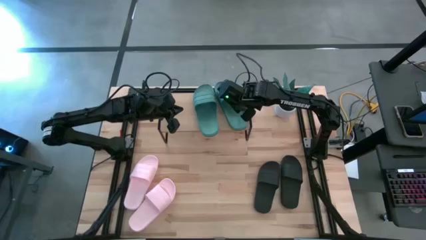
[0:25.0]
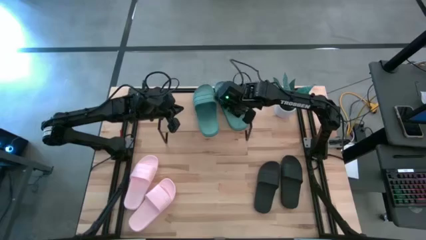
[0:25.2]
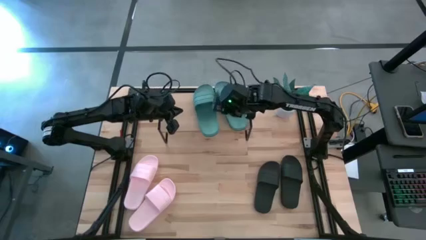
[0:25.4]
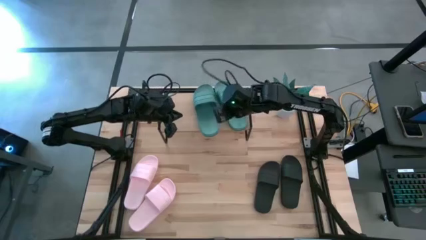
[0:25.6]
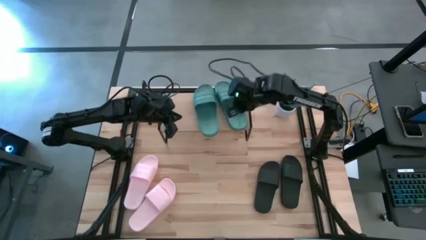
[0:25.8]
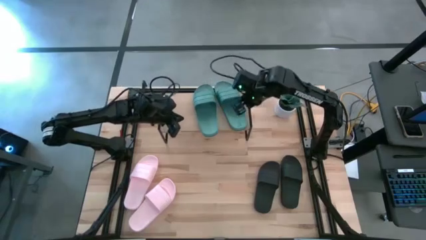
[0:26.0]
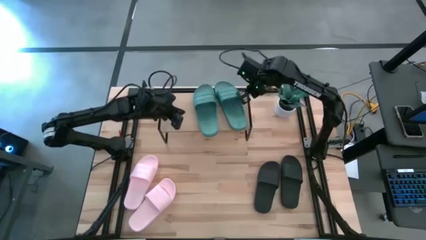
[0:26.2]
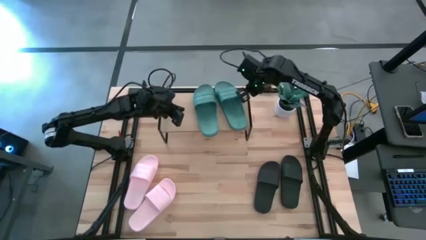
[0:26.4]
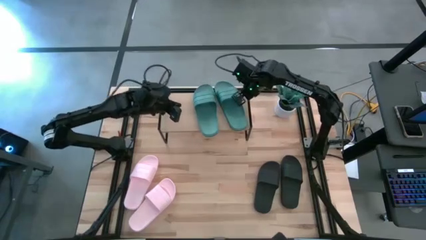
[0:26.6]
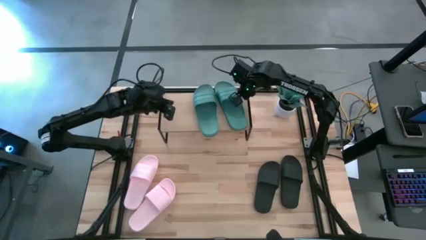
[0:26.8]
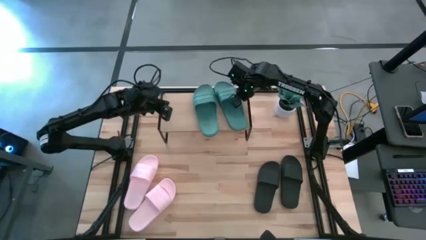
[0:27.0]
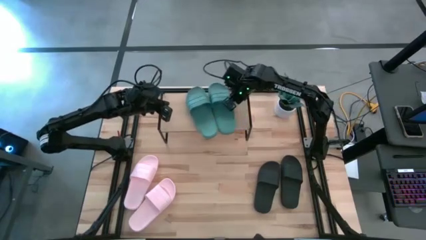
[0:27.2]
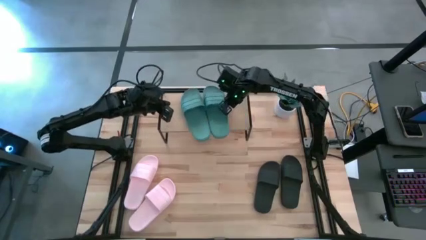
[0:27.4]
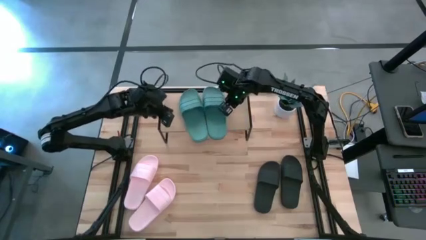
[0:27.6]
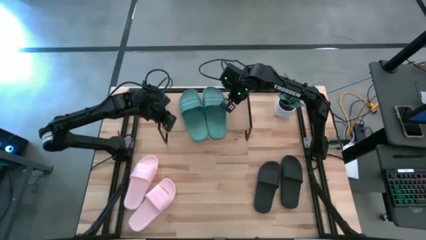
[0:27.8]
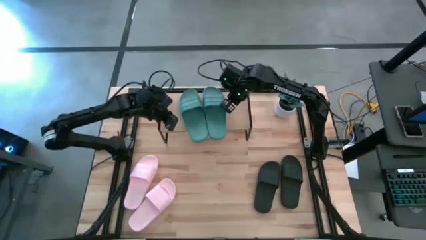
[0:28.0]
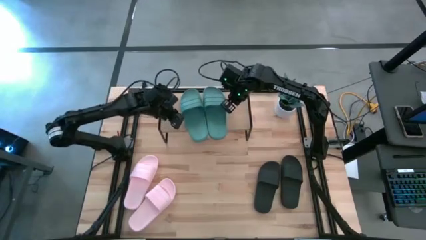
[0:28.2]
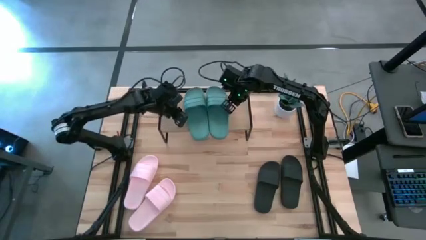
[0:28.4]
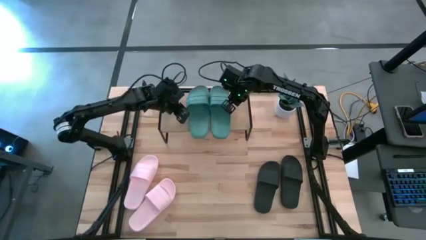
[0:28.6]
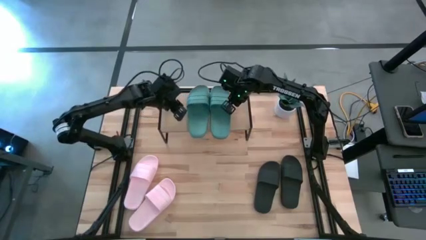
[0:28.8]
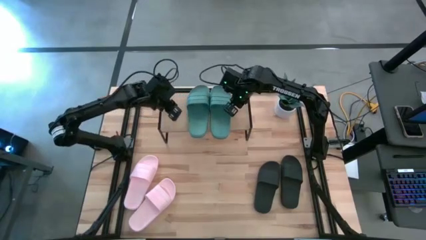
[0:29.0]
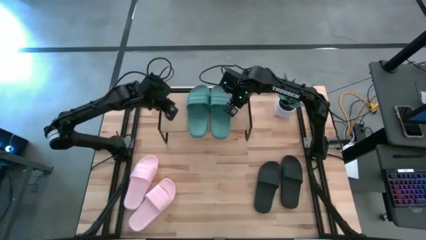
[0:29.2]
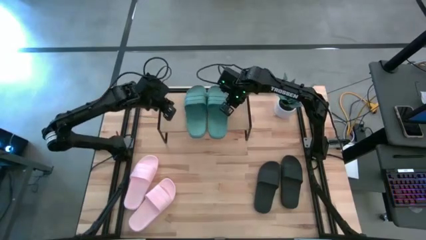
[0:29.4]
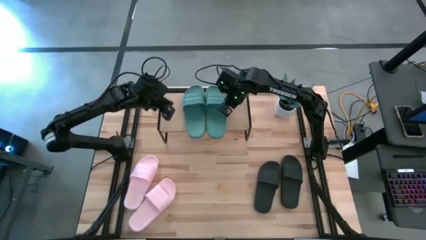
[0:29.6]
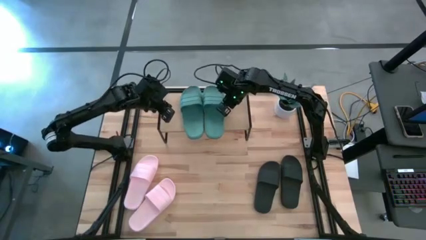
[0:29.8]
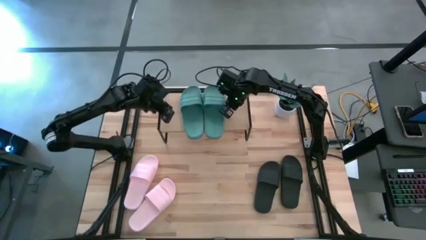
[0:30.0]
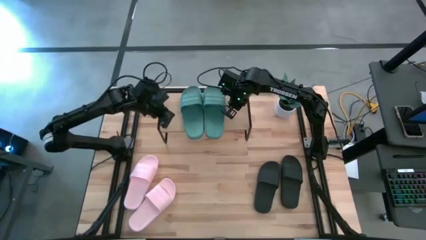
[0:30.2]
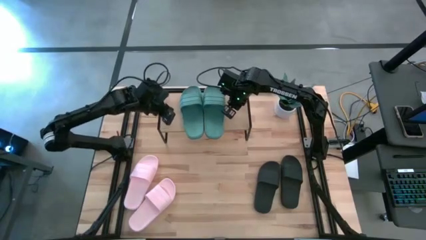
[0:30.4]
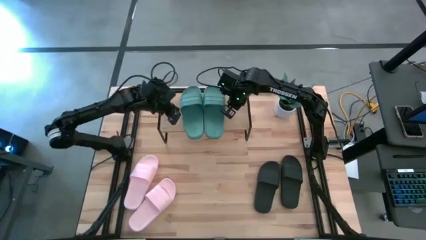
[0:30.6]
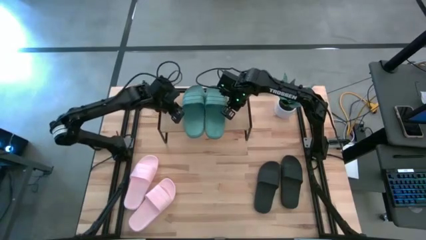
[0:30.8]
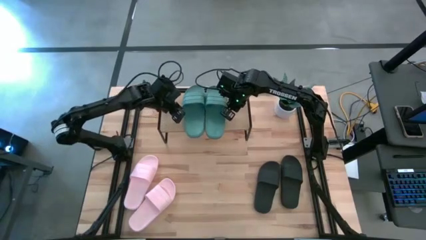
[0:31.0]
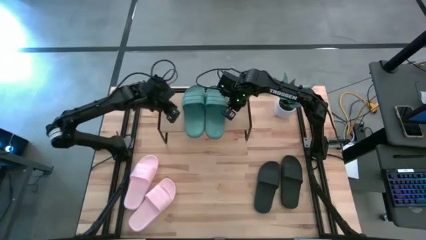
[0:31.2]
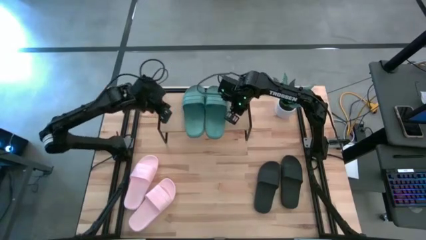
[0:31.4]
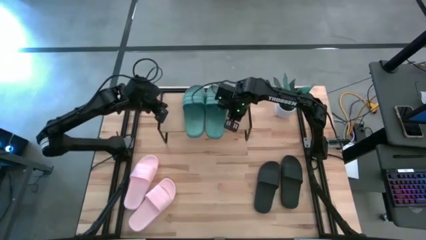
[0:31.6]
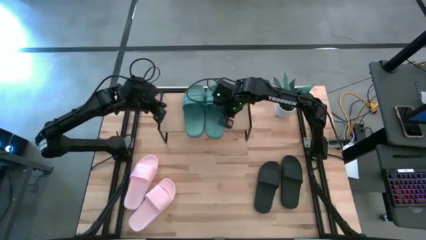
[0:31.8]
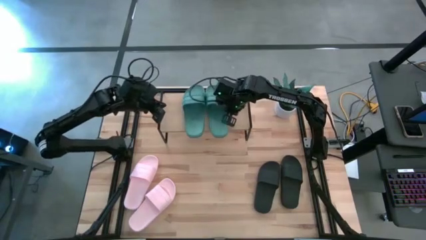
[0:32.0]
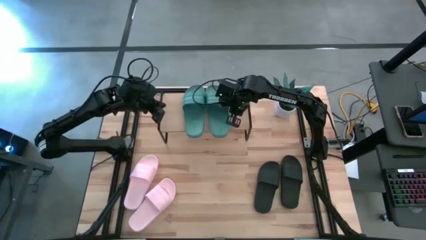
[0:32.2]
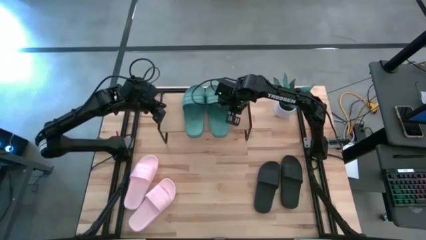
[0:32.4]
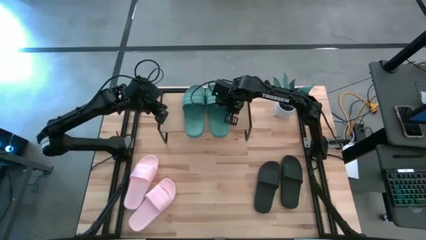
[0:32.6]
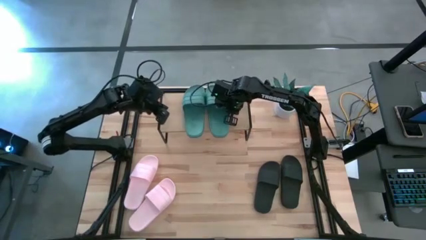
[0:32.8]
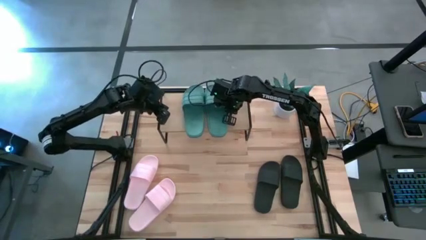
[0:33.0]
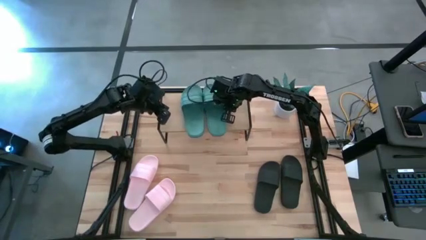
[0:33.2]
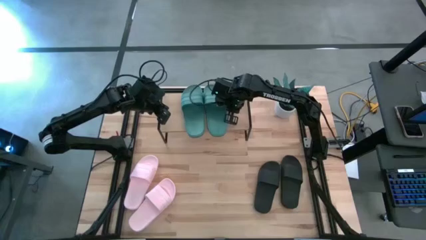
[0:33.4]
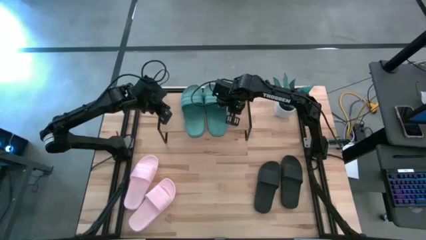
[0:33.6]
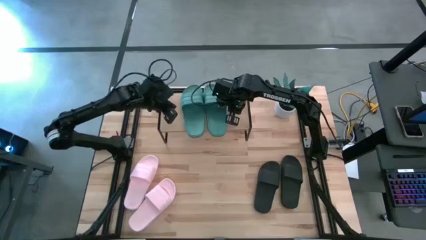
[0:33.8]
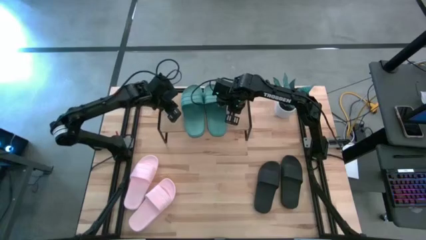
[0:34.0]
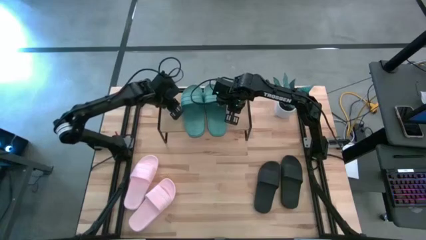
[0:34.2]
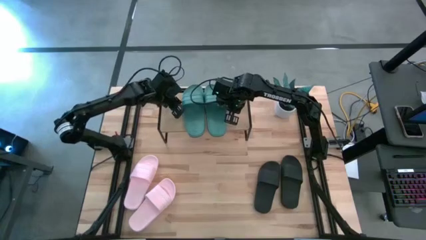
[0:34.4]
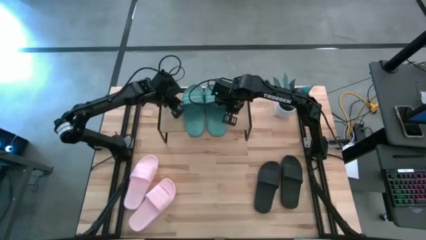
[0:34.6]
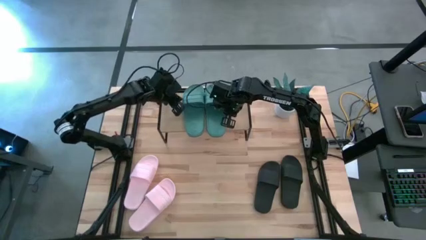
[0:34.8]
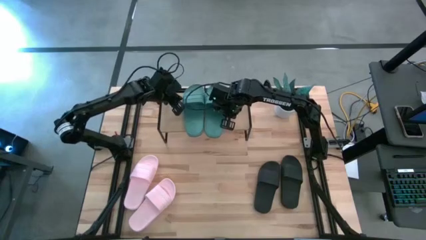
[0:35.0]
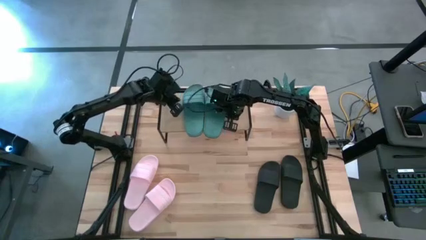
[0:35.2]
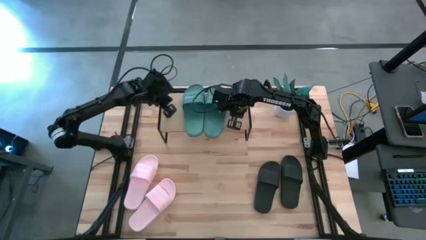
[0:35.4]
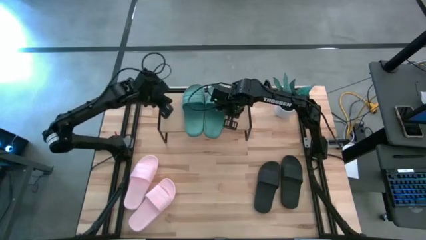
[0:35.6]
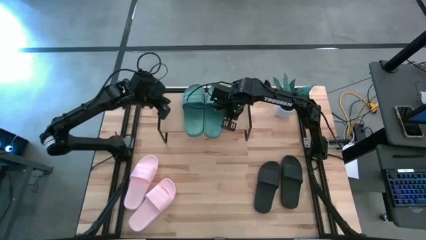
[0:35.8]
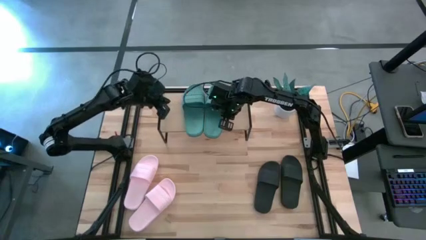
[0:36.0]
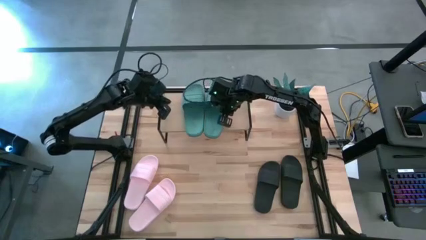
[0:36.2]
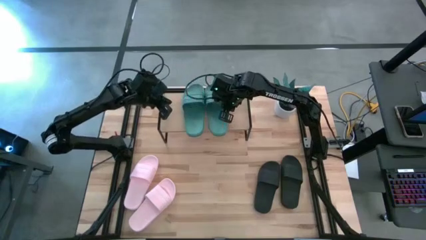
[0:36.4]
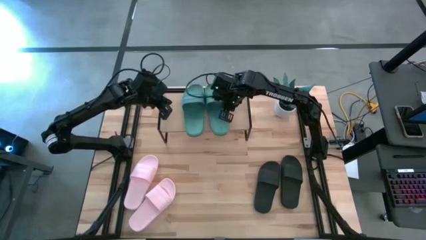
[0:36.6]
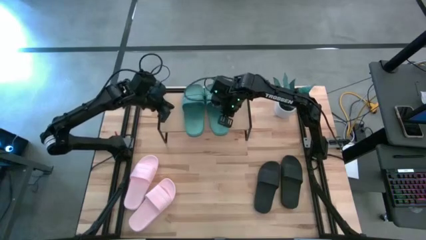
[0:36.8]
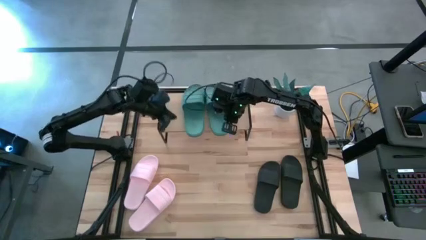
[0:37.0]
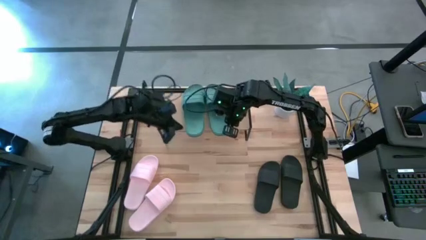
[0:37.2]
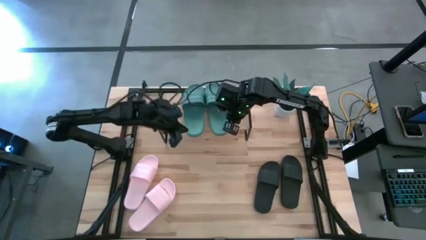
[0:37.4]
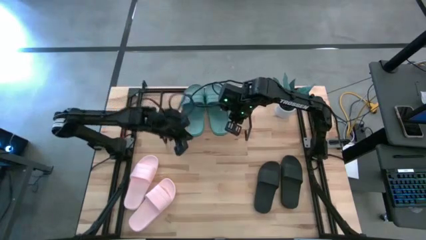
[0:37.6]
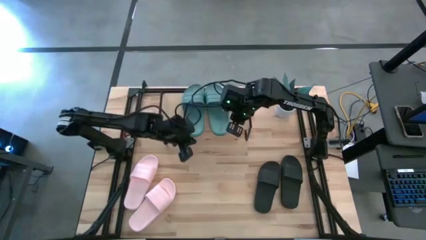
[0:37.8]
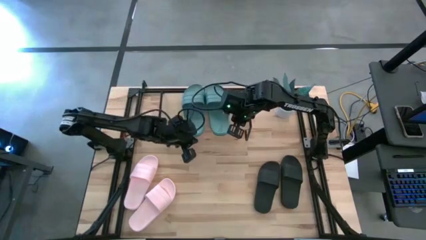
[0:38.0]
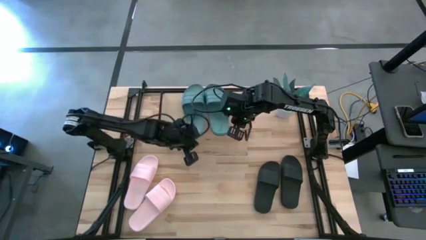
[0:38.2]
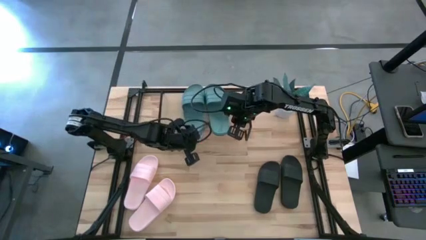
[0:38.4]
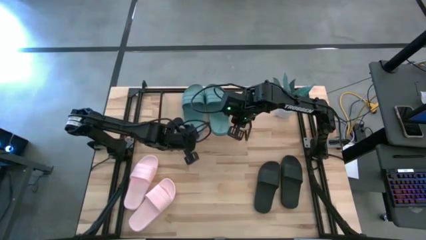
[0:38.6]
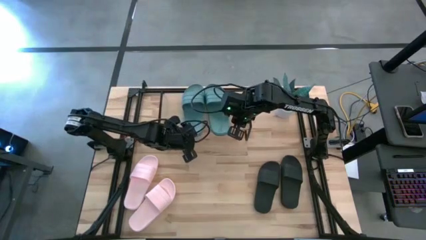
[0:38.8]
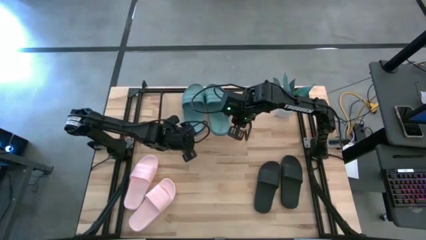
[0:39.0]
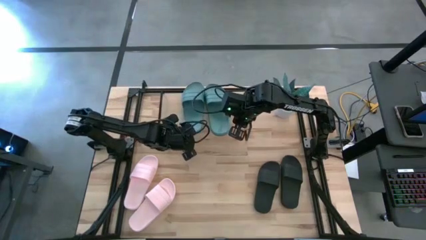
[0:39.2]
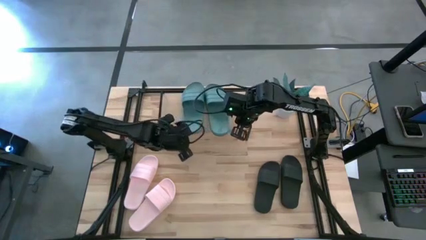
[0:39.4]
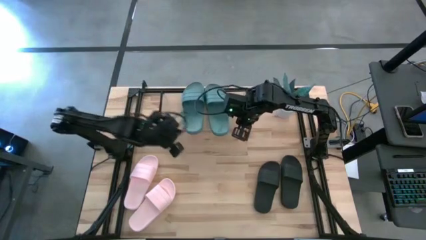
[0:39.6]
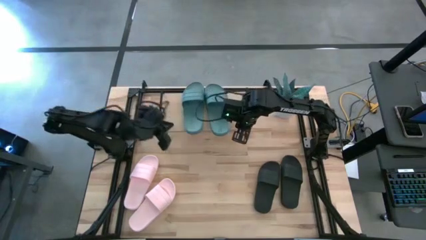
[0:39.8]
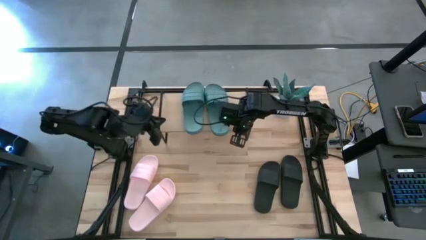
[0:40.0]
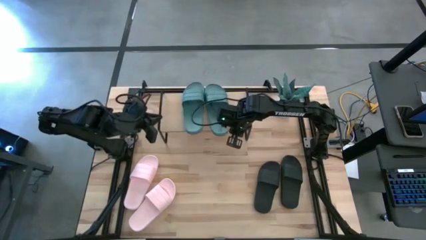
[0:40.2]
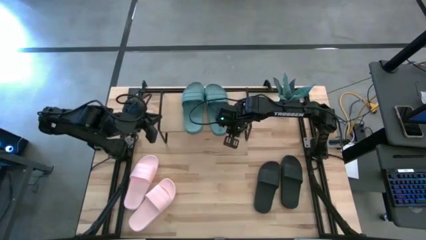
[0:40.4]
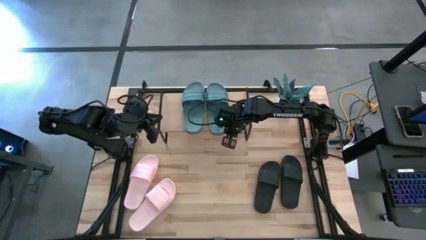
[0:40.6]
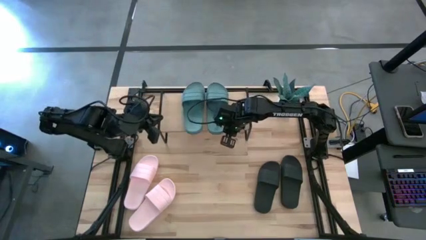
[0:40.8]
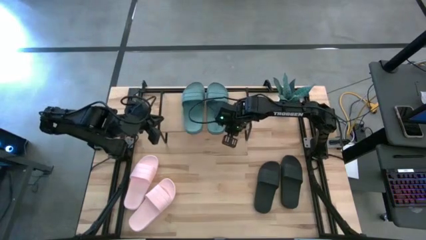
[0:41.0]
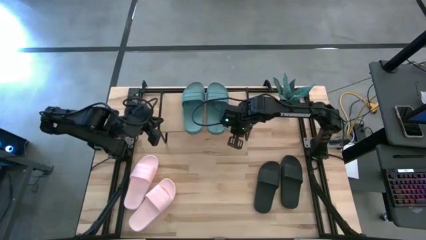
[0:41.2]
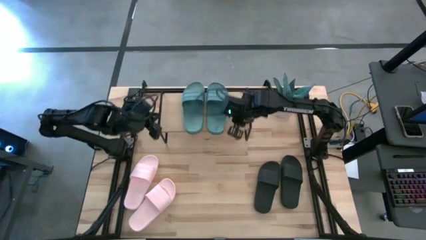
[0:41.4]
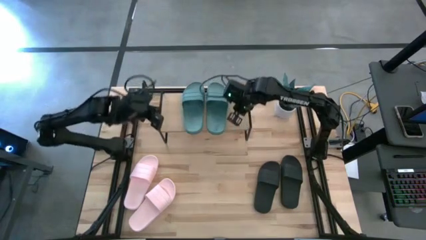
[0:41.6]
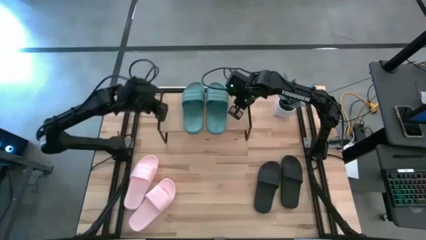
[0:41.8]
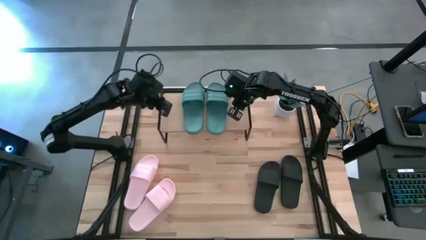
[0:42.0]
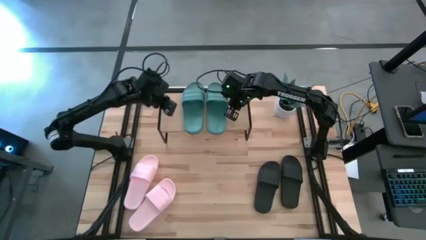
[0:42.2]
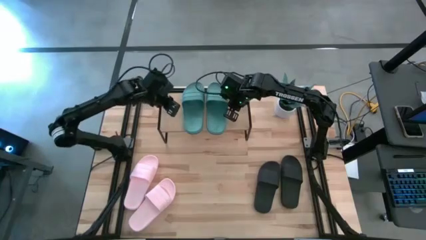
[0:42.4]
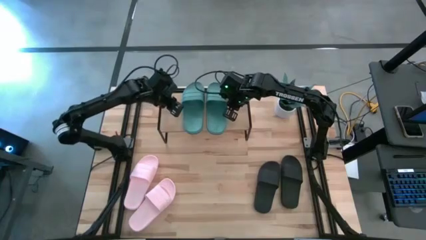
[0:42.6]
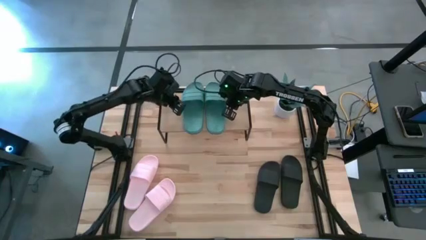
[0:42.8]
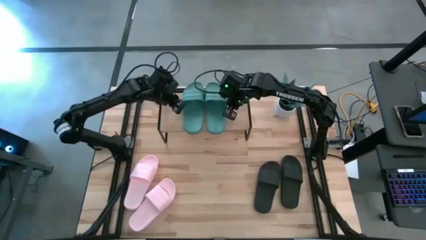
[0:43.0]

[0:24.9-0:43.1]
Task: Pick and place slides into the shelf
Adjust the green slides on the shelf
